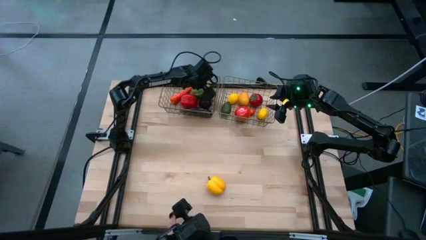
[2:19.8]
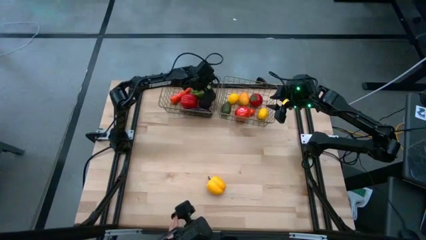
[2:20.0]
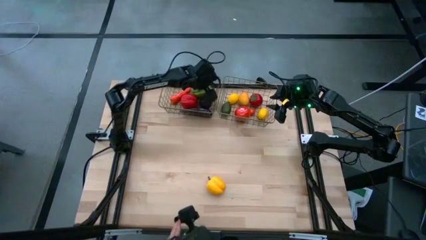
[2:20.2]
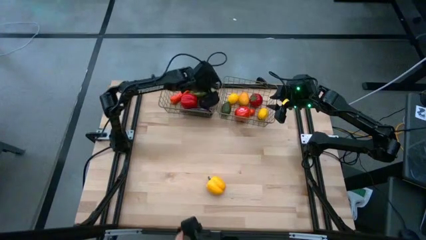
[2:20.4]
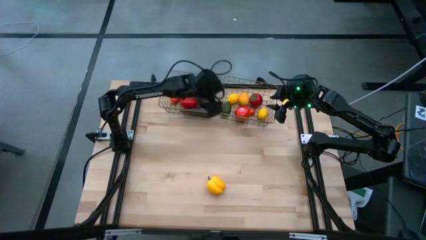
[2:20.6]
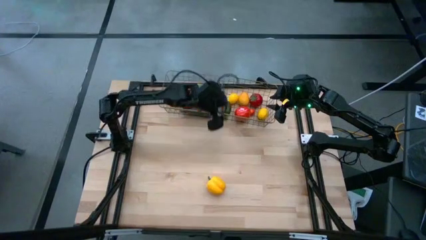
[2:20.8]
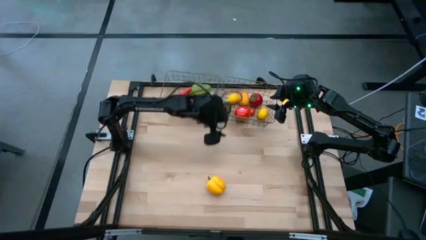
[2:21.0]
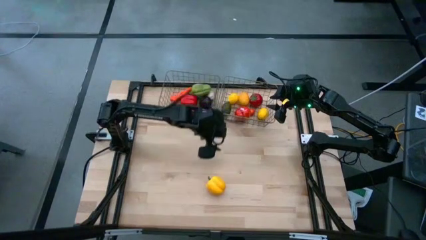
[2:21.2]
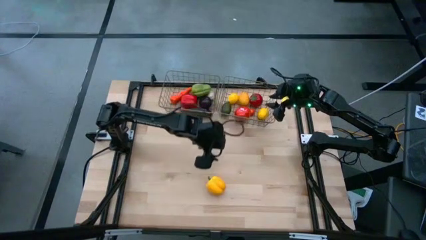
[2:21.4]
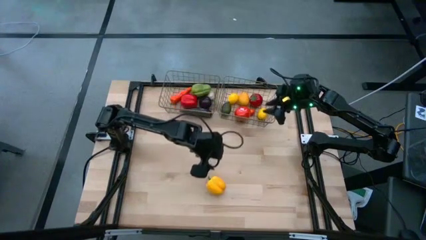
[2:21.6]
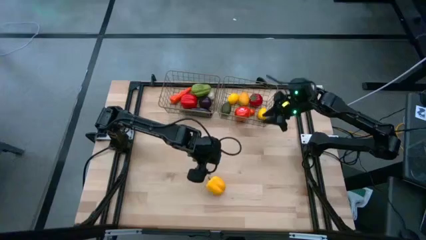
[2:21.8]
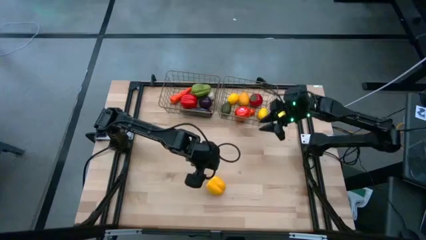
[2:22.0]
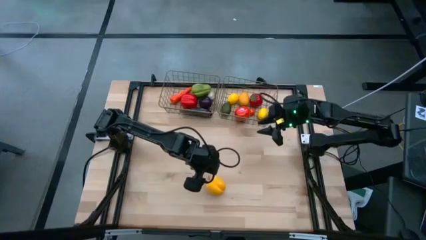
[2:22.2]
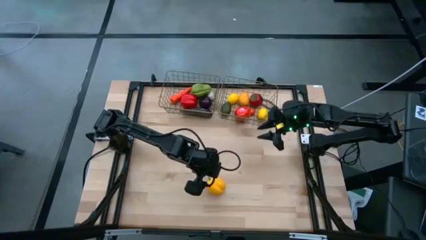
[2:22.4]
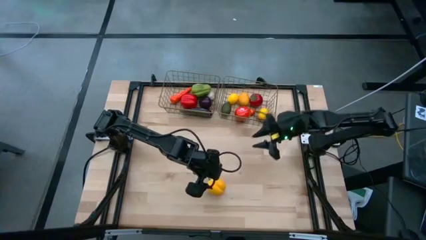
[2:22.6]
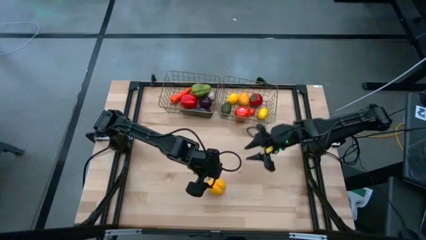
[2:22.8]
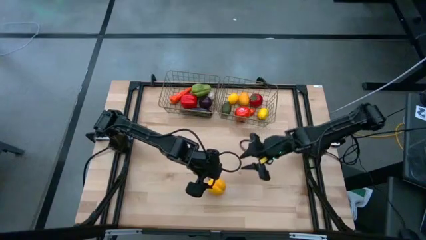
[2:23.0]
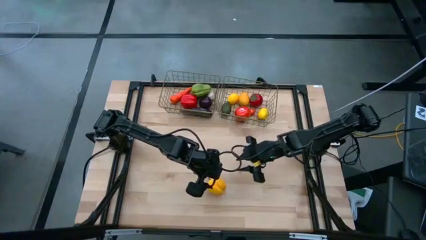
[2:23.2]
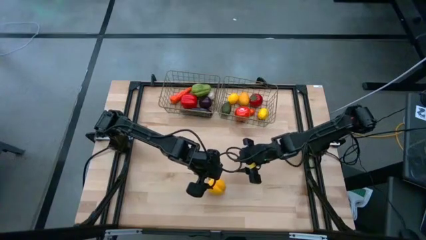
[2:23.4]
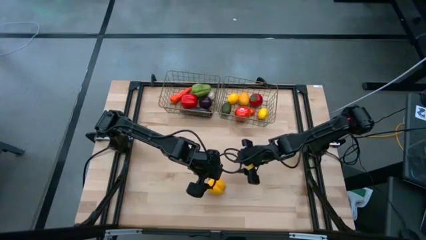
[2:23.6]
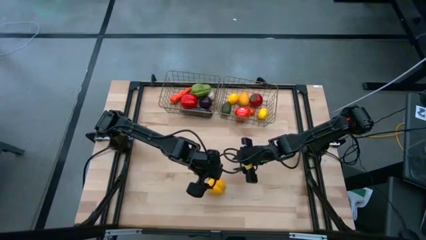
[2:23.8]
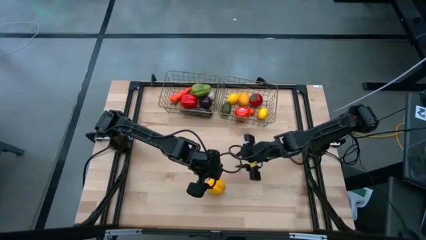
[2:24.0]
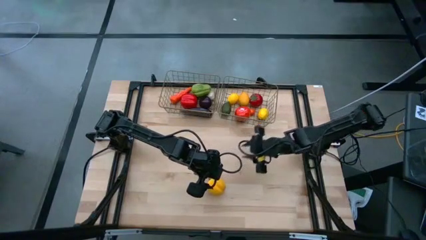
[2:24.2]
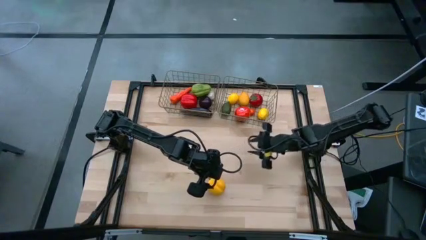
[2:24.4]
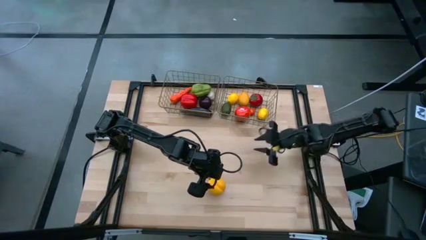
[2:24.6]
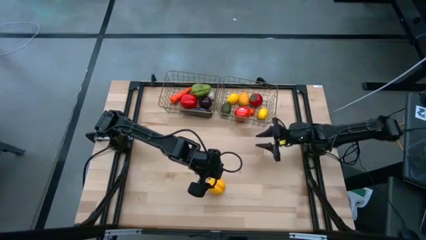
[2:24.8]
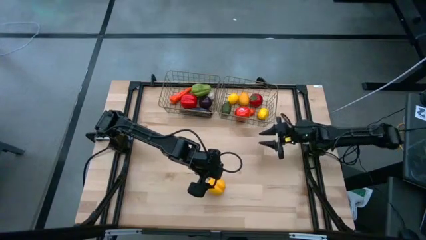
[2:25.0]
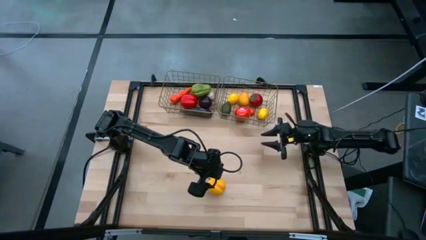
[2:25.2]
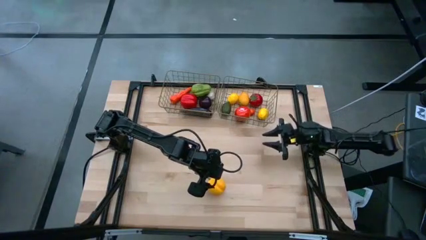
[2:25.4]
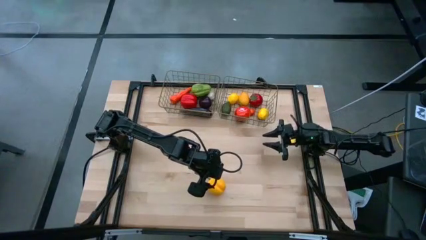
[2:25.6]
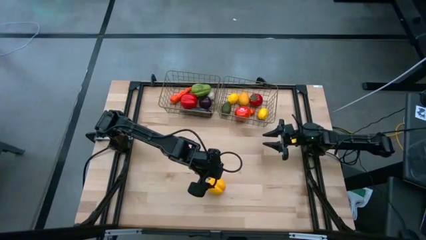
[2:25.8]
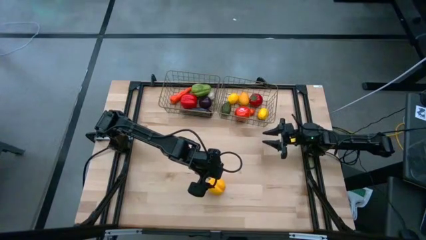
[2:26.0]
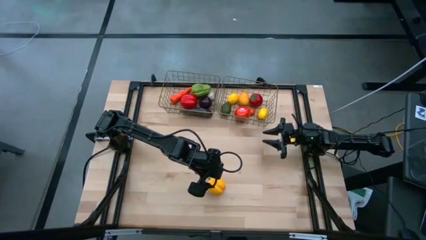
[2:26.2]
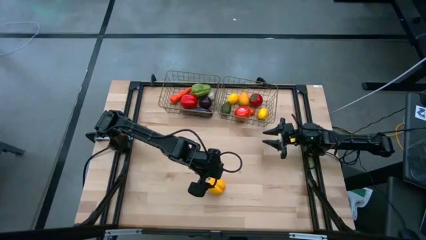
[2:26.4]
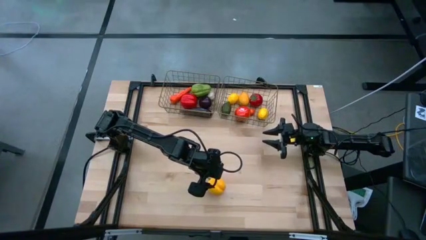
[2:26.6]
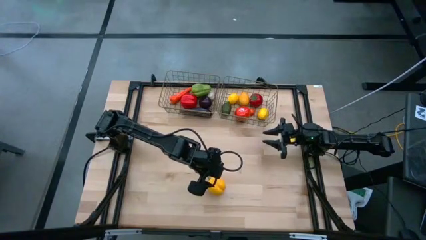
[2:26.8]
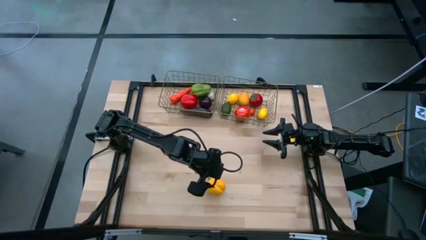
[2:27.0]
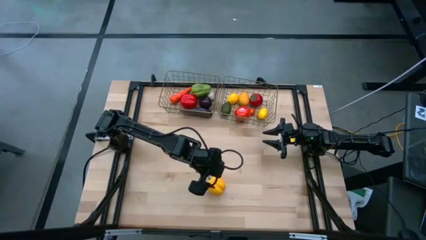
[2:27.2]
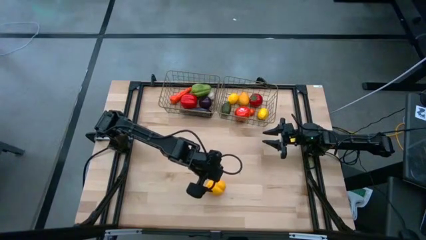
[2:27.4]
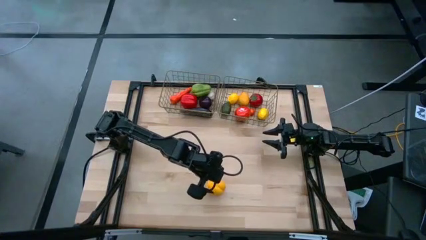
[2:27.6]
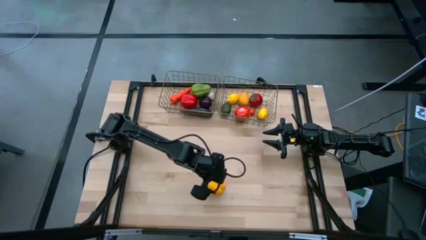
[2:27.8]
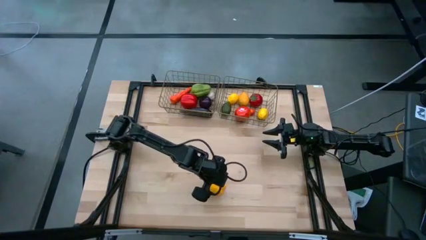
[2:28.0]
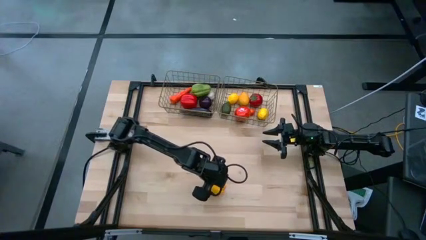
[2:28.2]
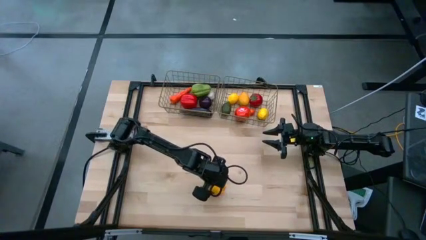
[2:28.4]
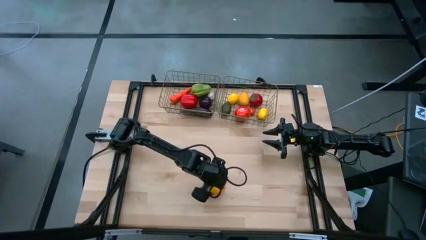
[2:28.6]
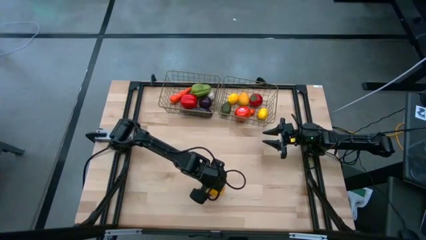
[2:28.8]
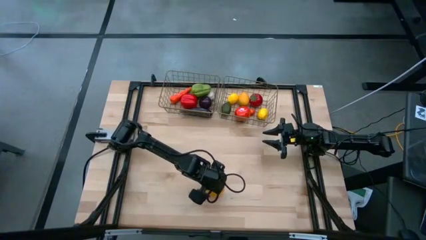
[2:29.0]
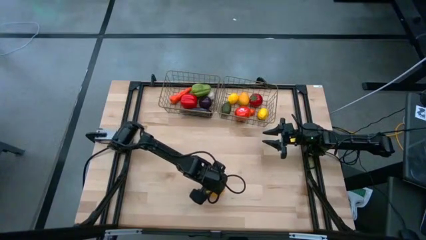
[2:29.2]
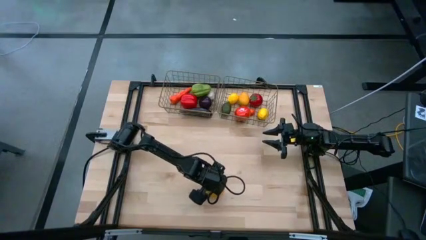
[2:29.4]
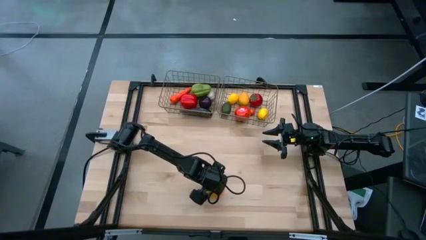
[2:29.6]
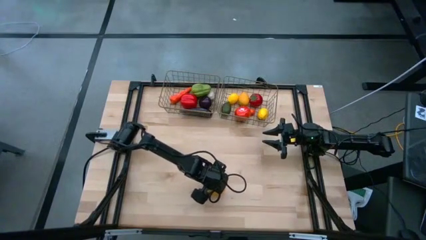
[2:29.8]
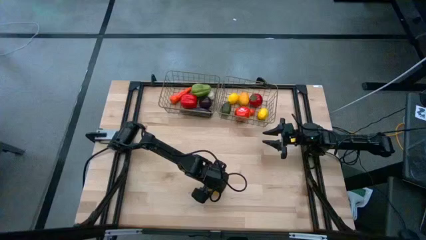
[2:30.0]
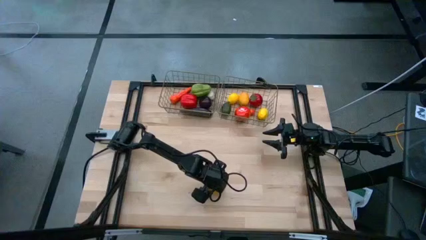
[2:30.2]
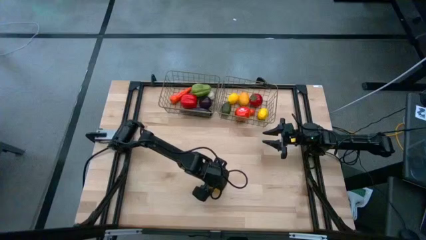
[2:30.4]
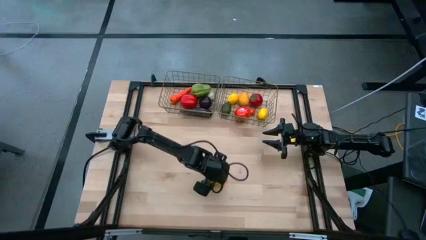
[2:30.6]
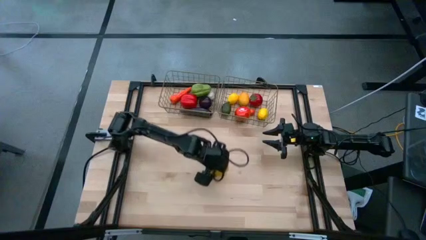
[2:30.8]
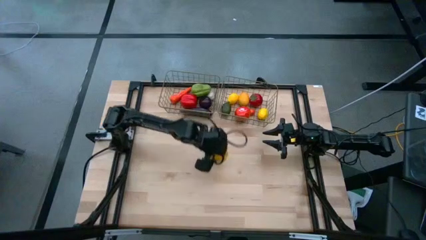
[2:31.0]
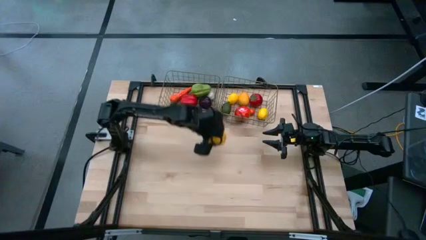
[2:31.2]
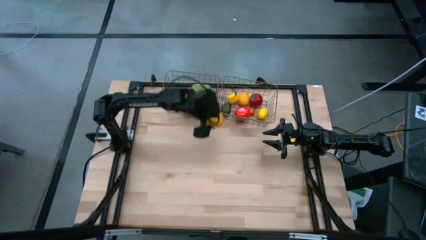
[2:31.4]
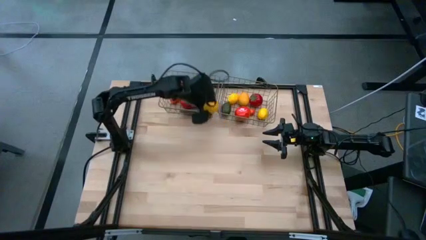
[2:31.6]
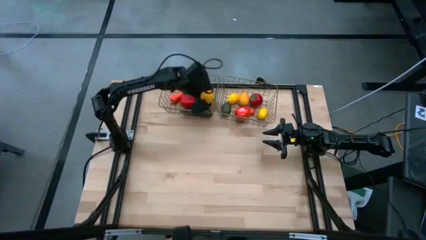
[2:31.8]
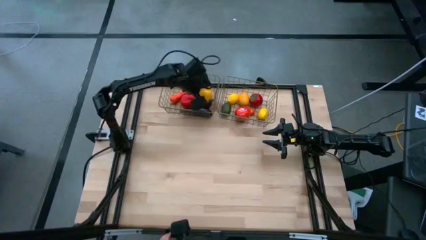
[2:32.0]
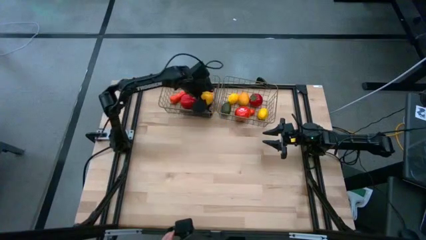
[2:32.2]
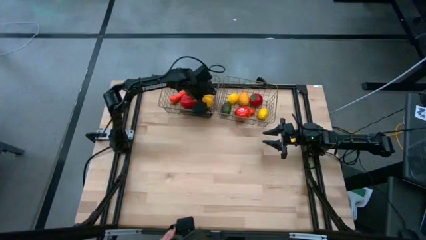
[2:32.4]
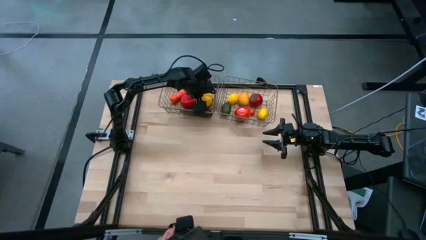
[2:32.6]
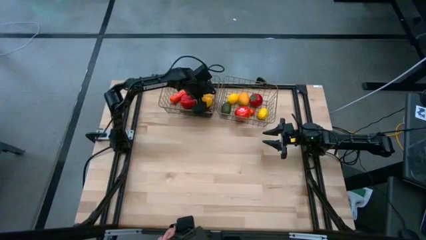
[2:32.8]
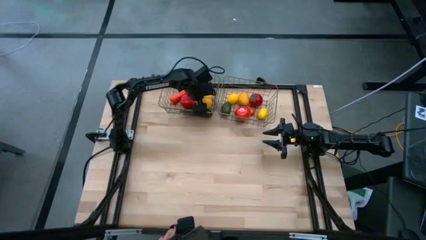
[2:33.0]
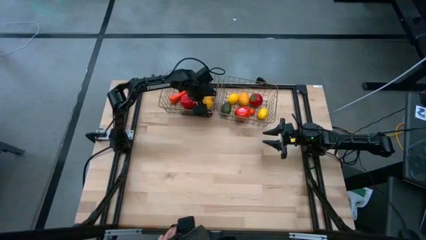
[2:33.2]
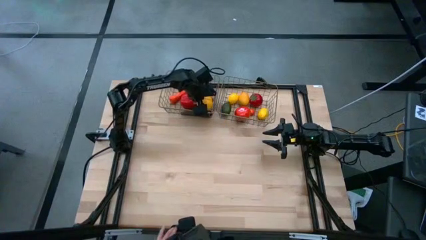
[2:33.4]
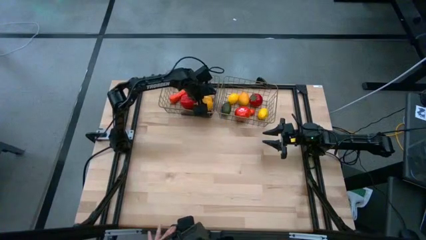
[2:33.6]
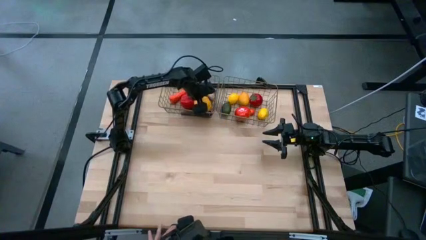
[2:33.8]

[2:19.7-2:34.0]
Task: Sort produce into baskets
Put the yellow bell pepper into the left golden wire basket
